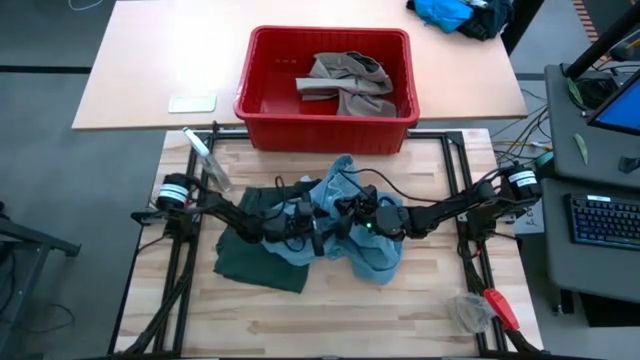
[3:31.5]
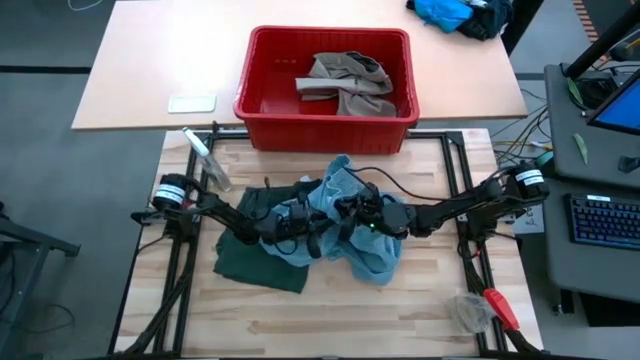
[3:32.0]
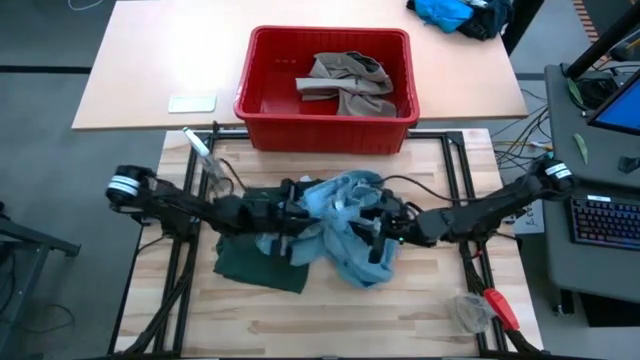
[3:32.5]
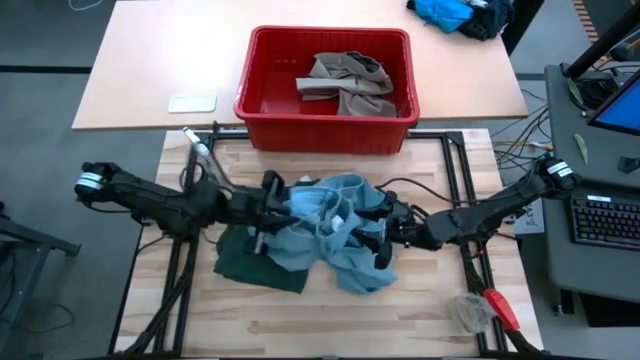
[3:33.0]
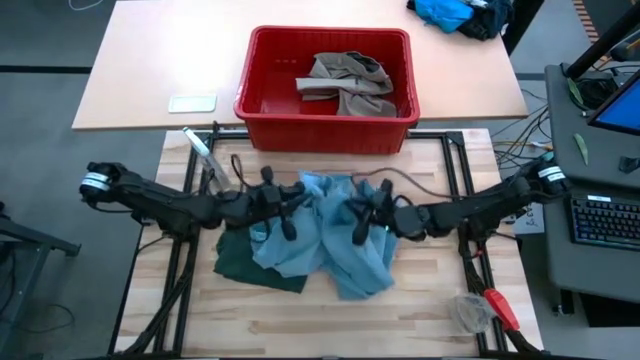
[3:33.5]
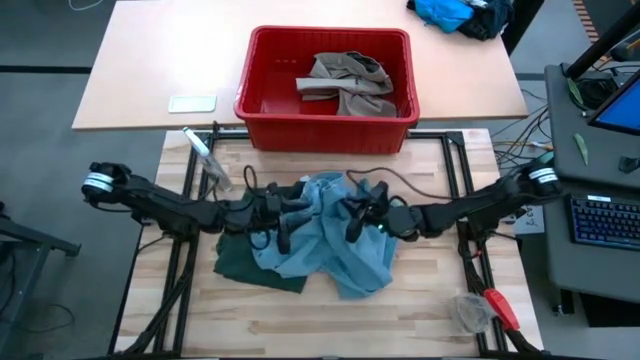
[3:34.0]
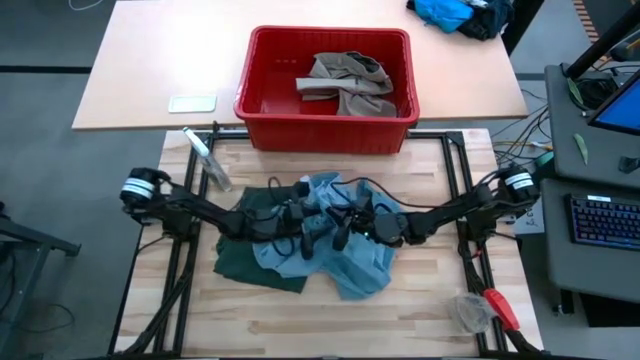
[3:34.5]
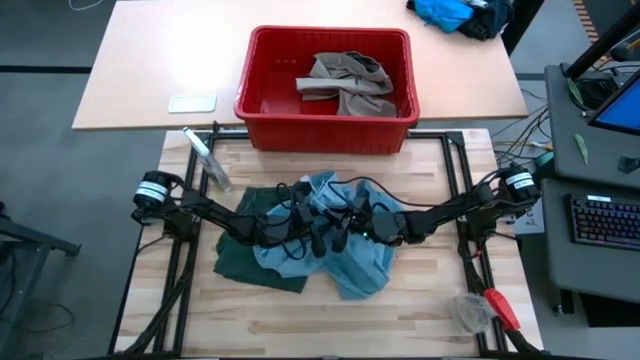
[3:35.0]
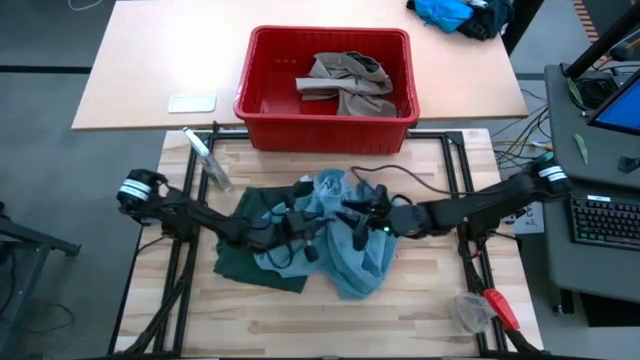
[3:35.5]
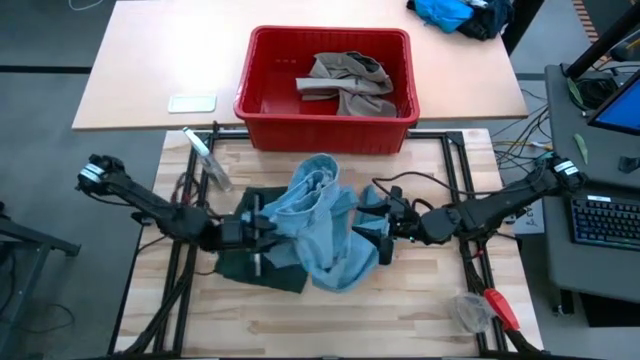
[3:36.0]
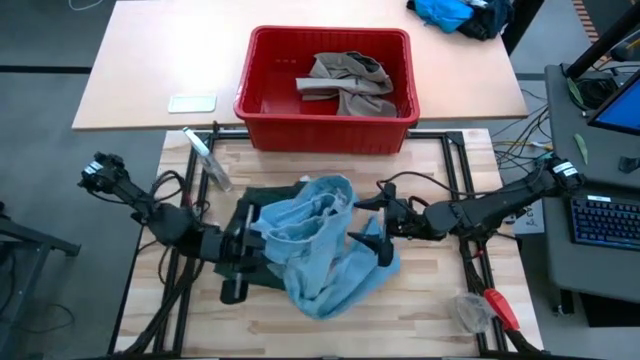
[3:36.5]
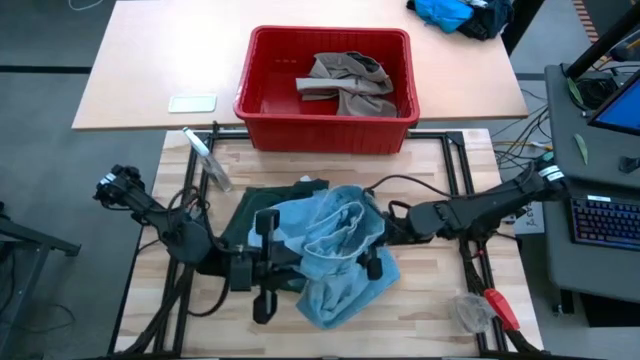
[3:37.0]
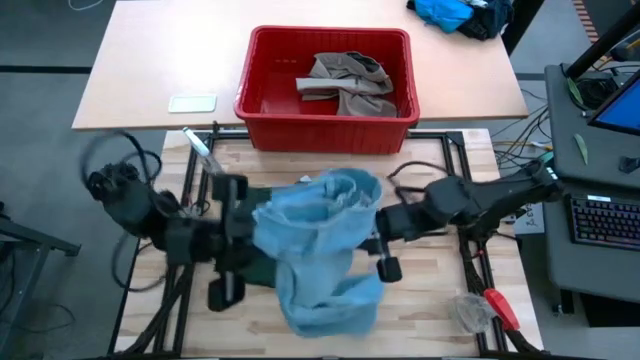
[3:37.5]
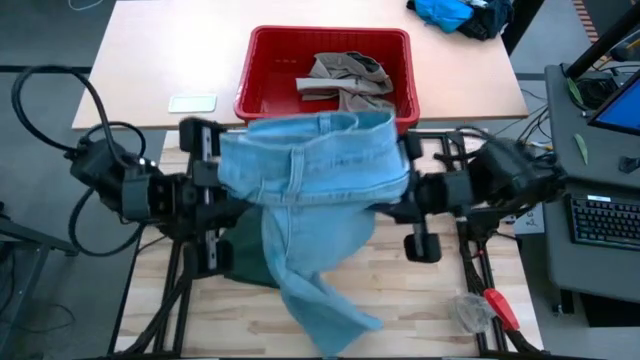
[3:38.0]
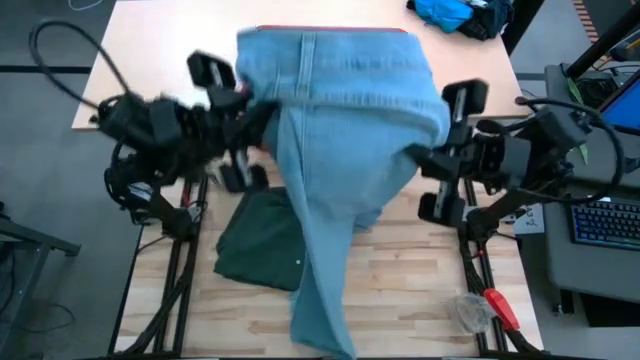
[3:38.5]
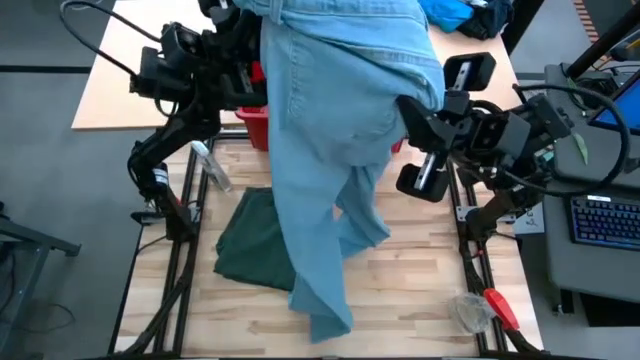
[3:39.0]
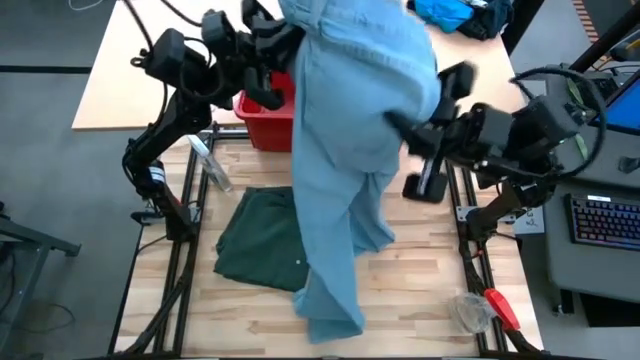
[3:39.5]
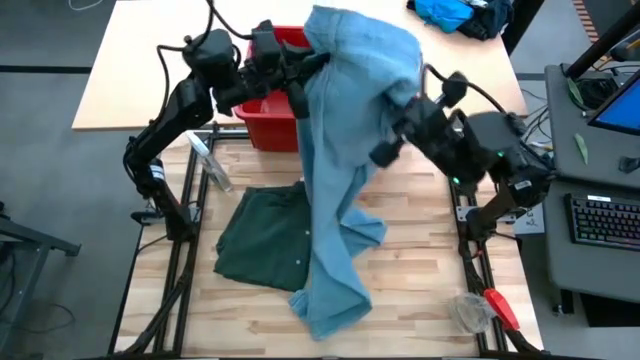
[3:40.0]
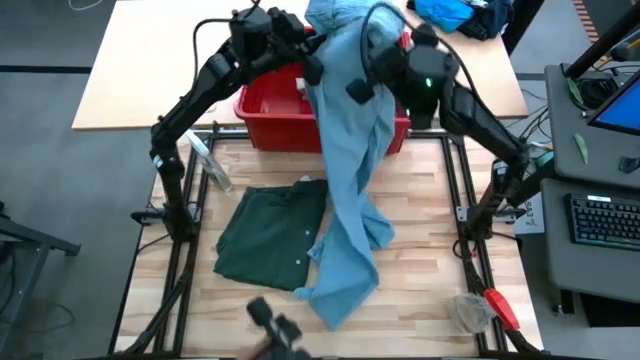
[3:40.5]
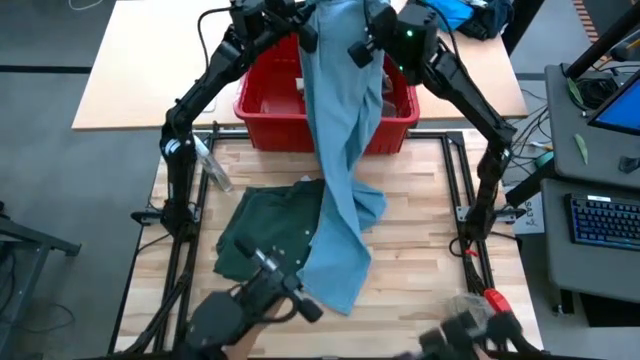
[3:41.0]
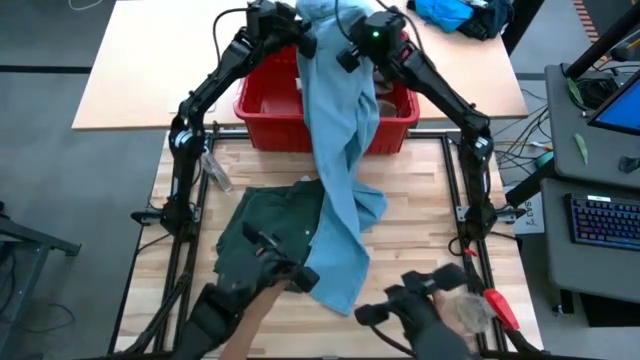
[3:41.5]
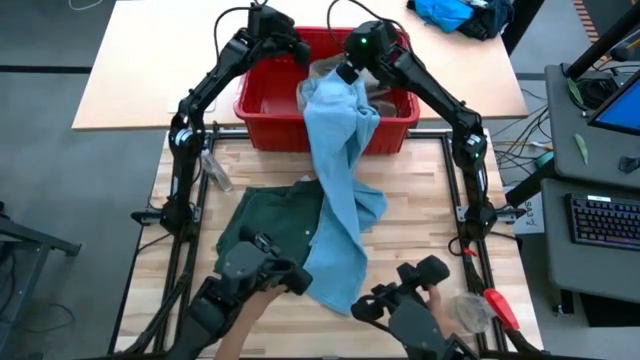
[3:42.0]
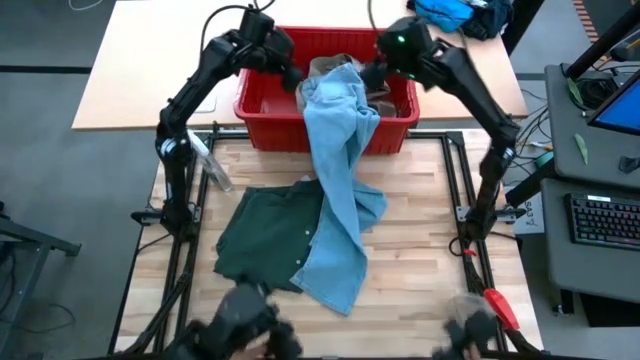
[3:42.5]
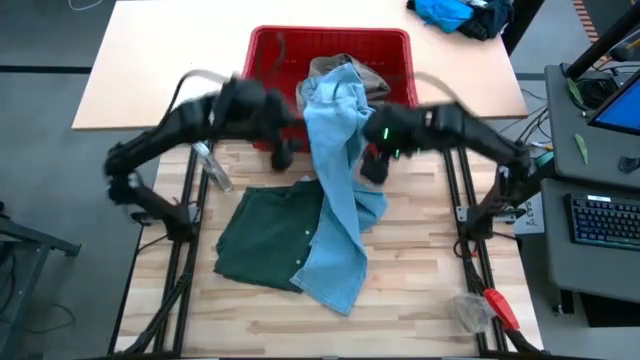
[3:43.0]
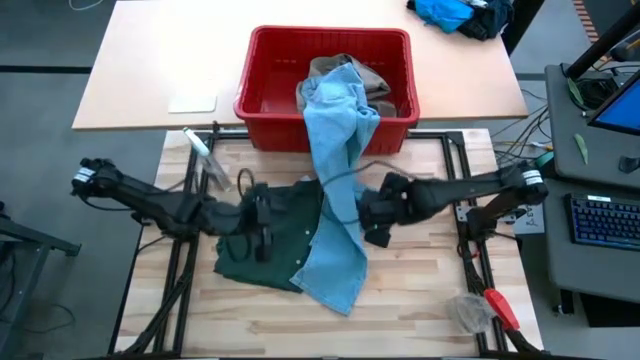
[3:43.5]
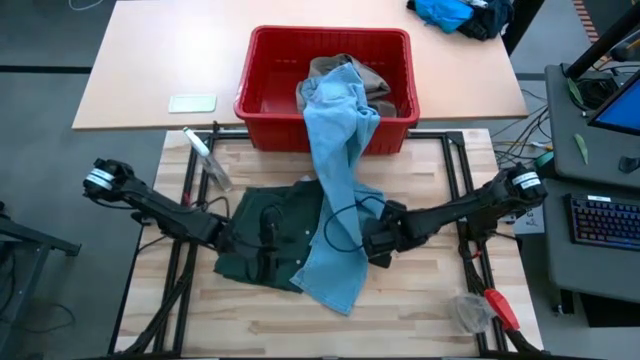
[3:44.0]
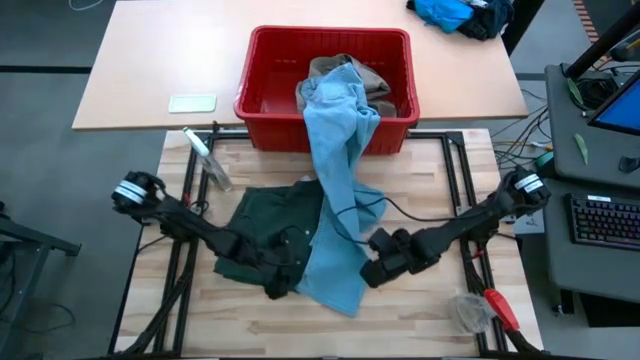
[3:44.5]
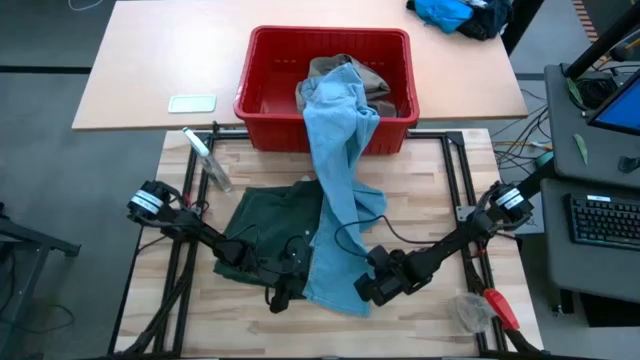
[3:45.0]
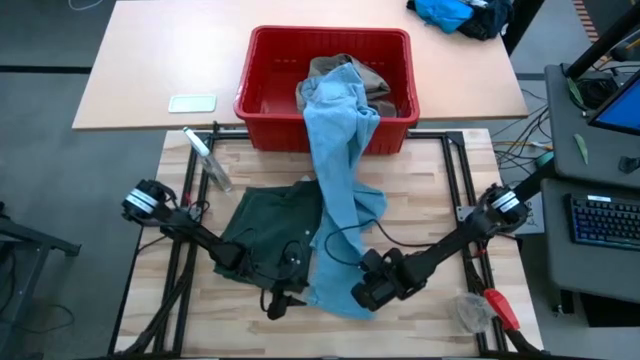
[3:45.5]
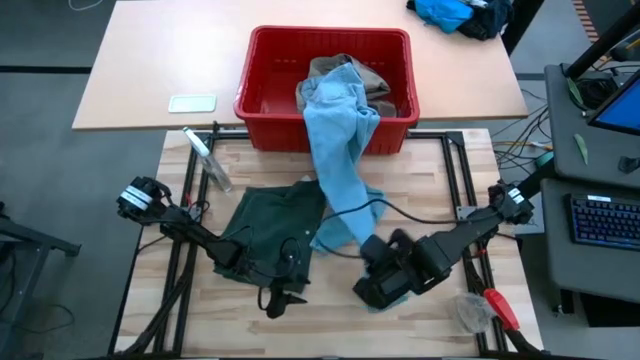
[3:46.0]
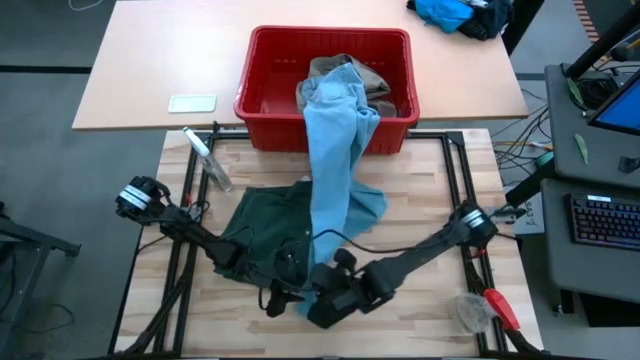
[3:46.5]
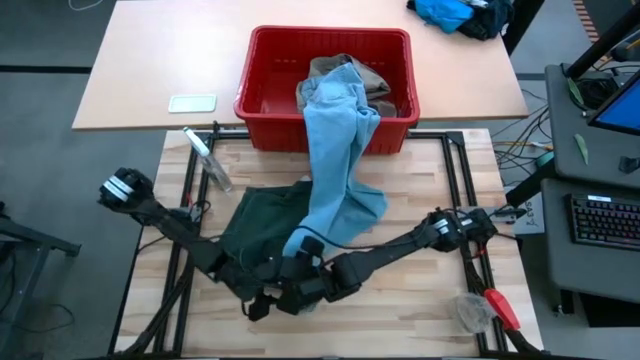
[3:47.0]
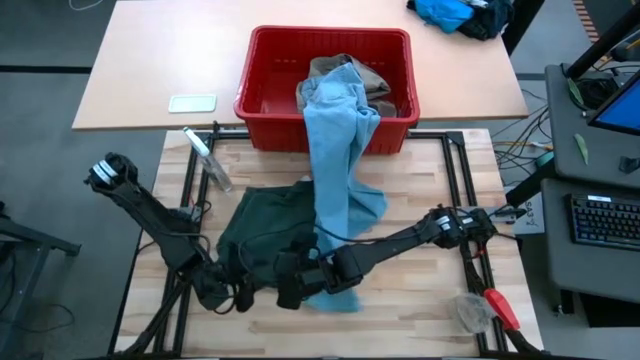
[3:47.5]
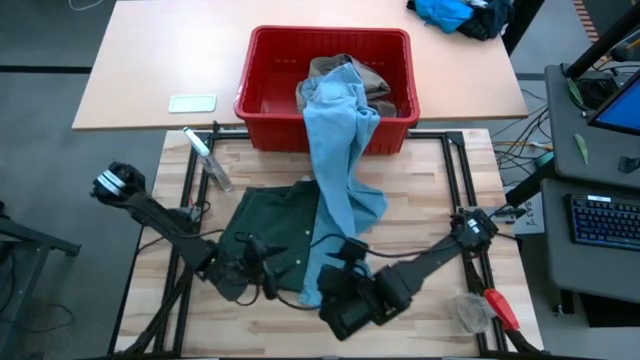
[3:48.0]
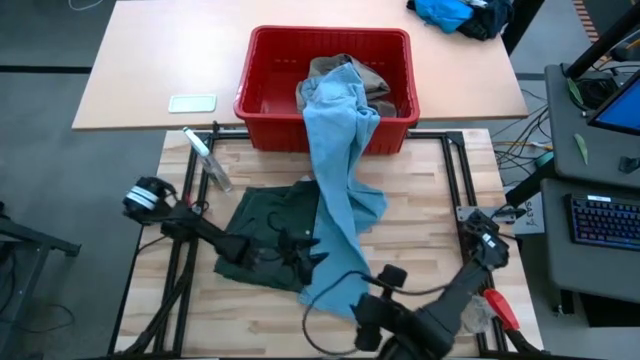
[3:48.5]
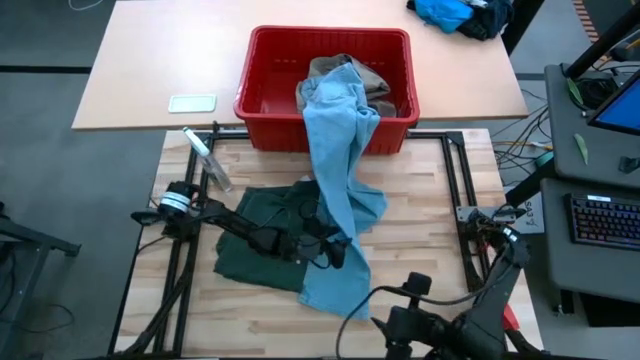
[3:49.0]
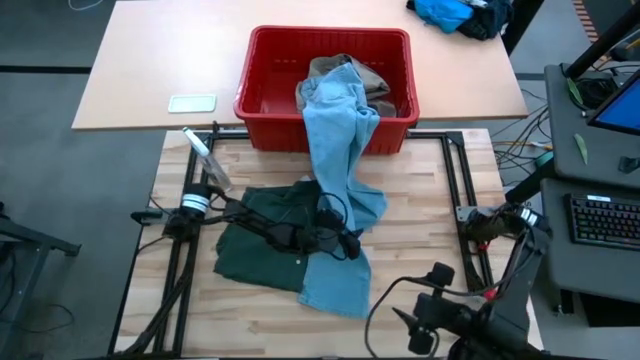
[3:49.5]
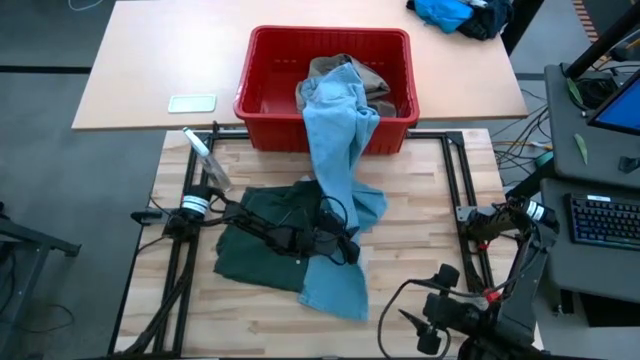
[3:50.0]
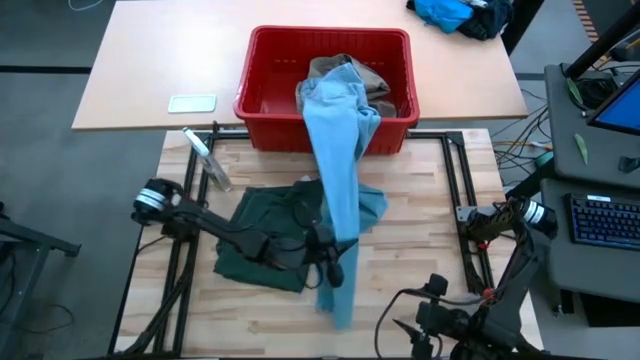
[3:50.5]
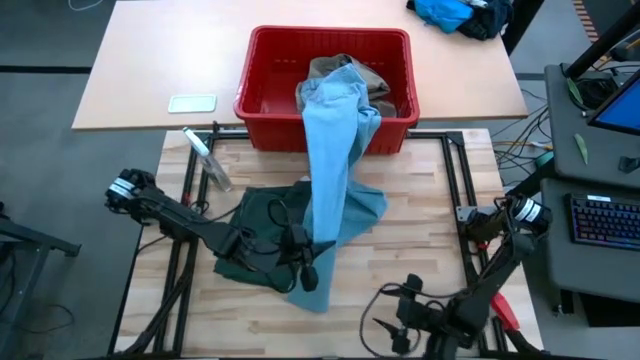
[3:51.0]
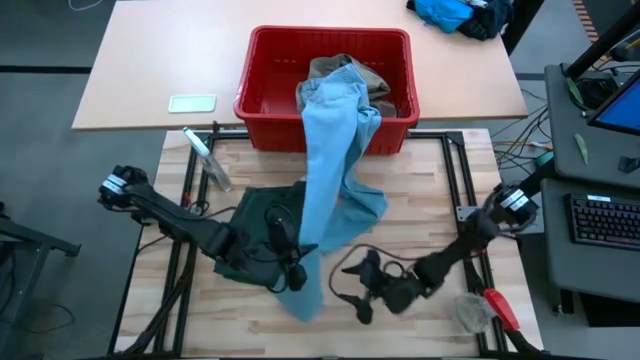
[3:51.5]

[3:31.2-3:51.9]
Task: Fold Laundry from Bin
Fold the blue jeans
